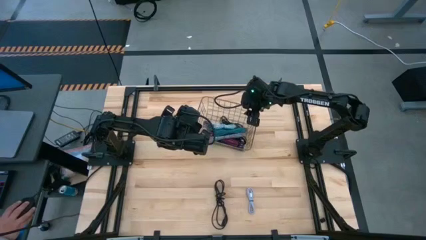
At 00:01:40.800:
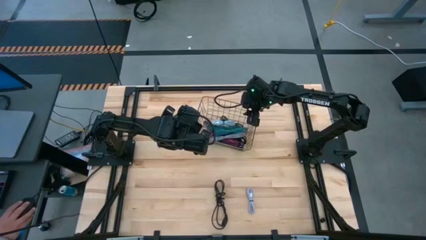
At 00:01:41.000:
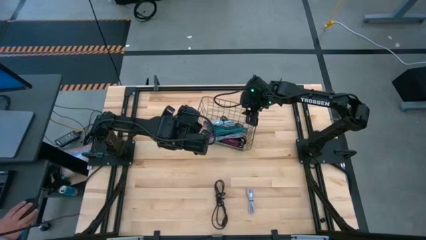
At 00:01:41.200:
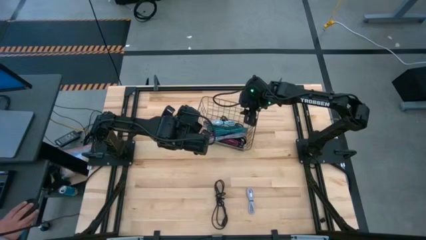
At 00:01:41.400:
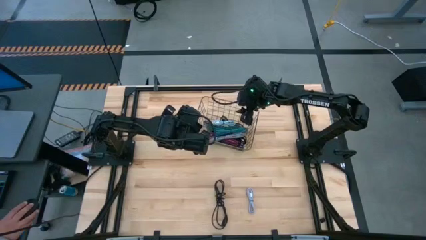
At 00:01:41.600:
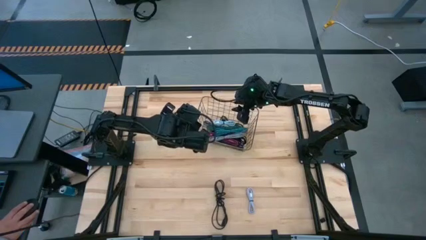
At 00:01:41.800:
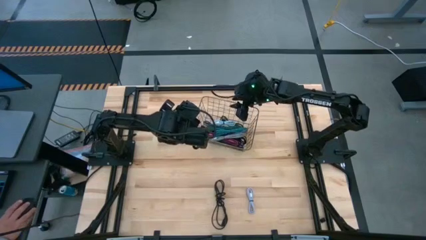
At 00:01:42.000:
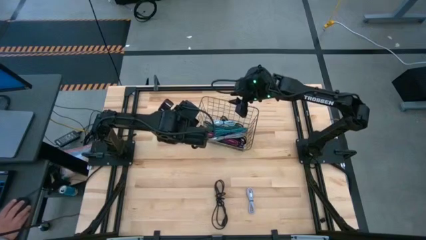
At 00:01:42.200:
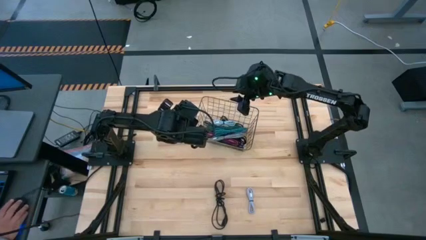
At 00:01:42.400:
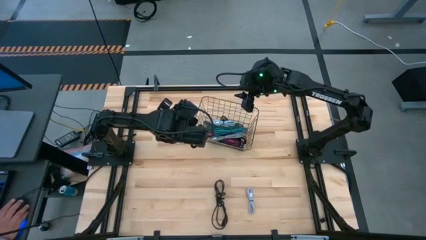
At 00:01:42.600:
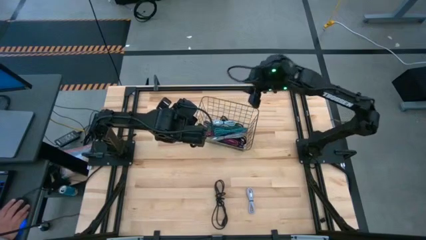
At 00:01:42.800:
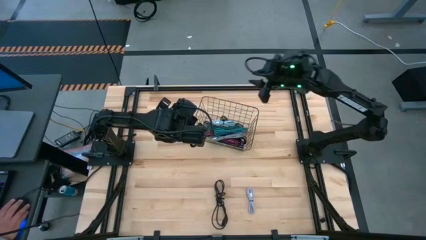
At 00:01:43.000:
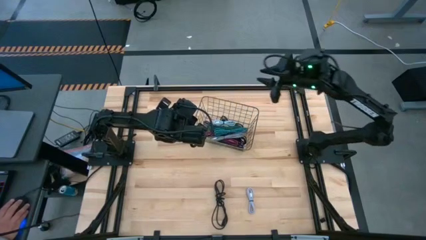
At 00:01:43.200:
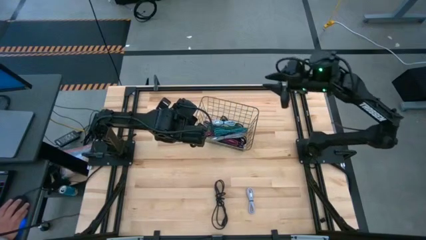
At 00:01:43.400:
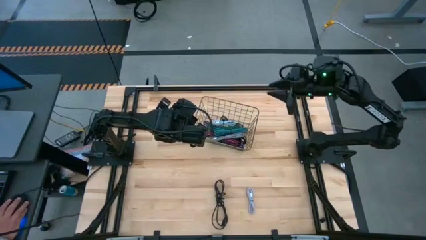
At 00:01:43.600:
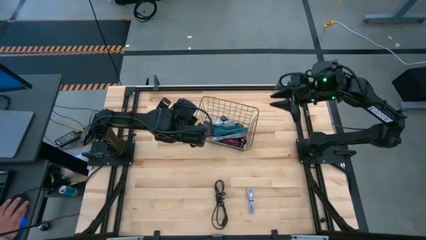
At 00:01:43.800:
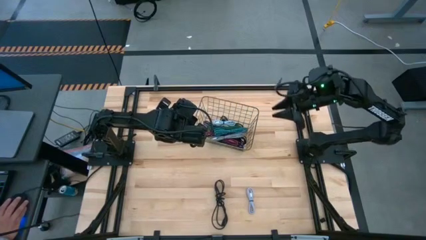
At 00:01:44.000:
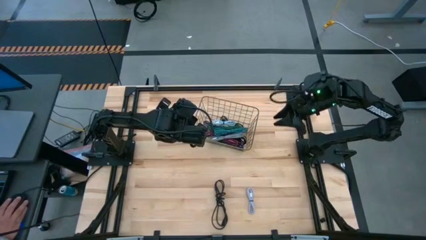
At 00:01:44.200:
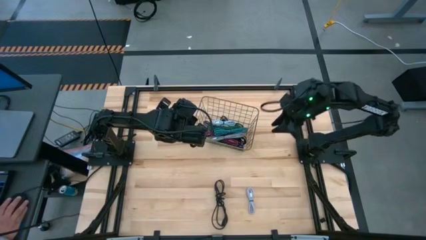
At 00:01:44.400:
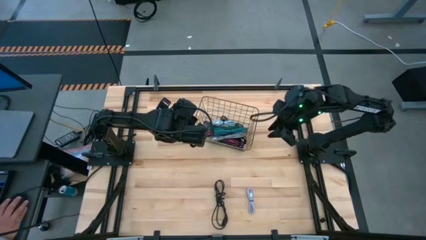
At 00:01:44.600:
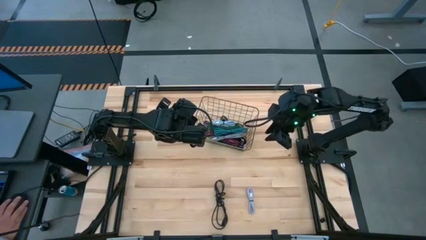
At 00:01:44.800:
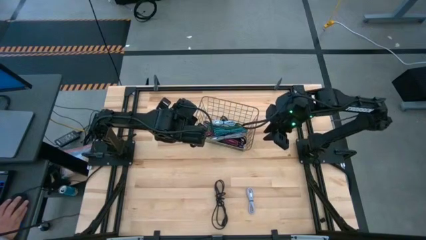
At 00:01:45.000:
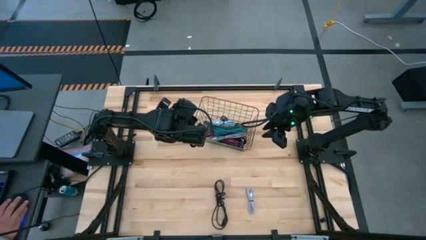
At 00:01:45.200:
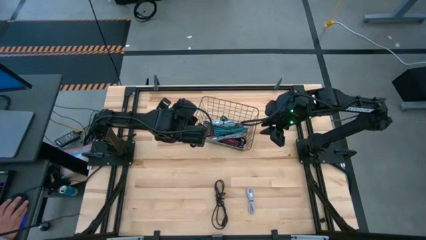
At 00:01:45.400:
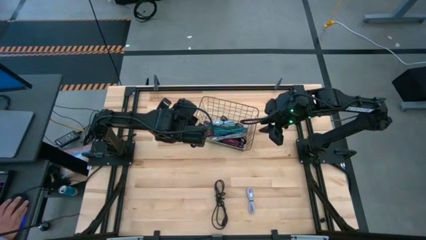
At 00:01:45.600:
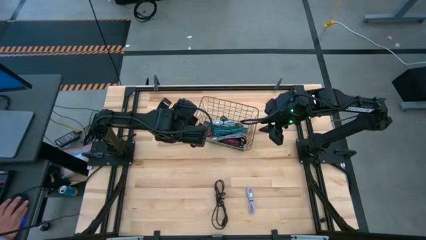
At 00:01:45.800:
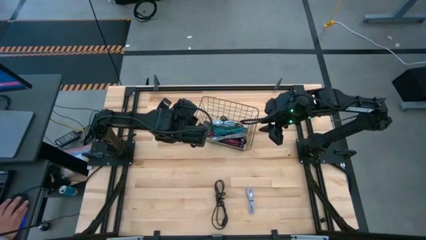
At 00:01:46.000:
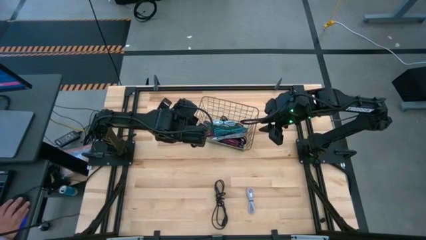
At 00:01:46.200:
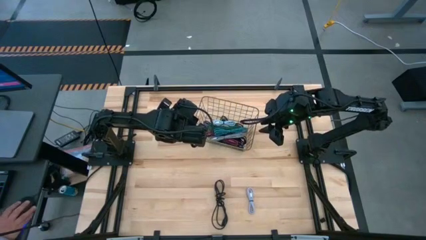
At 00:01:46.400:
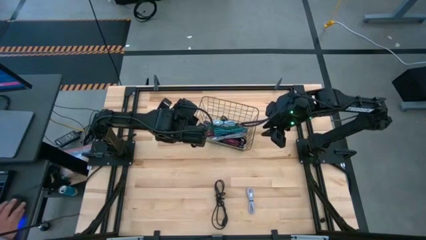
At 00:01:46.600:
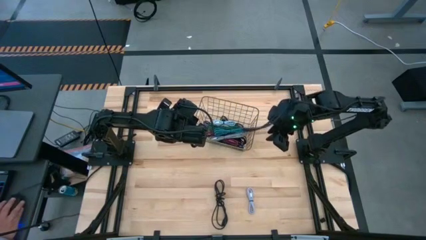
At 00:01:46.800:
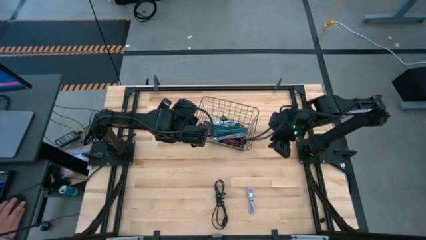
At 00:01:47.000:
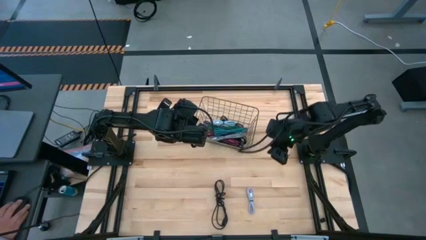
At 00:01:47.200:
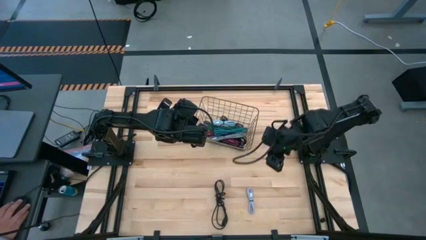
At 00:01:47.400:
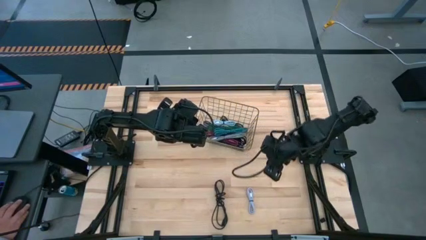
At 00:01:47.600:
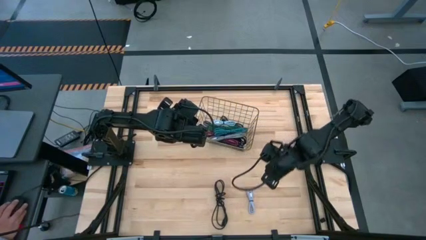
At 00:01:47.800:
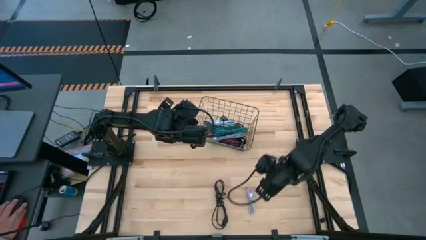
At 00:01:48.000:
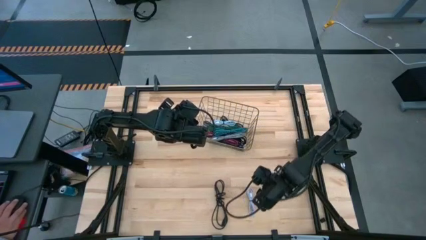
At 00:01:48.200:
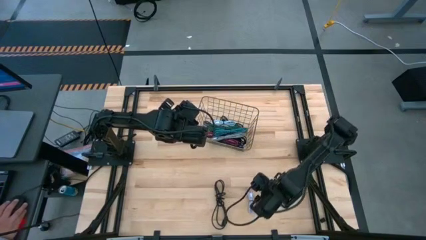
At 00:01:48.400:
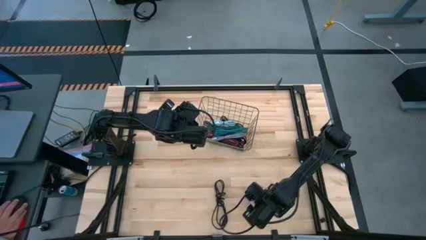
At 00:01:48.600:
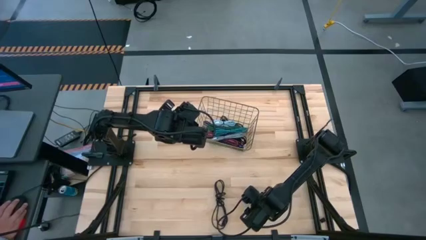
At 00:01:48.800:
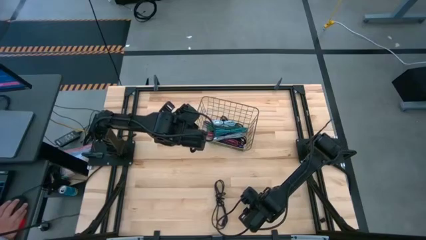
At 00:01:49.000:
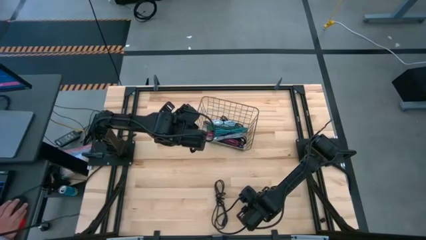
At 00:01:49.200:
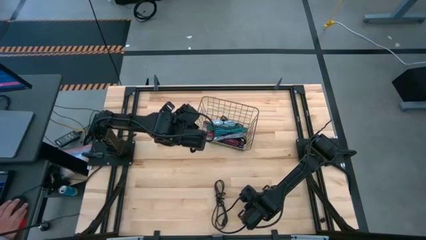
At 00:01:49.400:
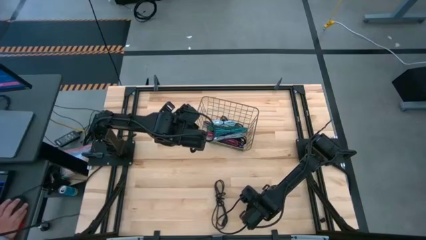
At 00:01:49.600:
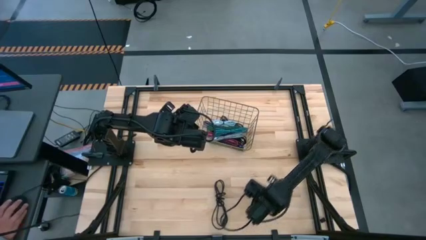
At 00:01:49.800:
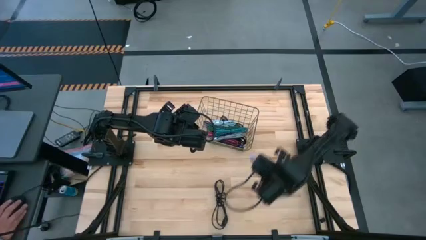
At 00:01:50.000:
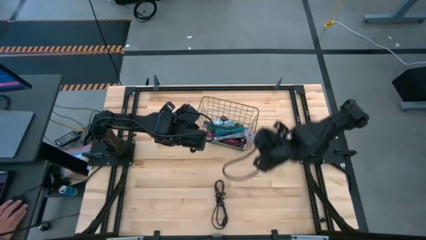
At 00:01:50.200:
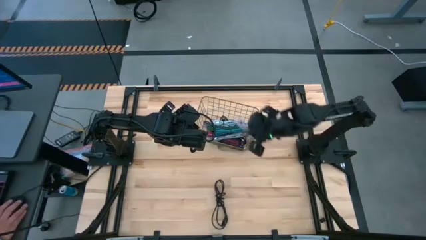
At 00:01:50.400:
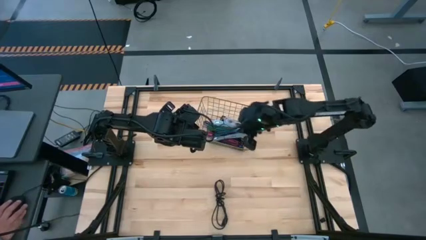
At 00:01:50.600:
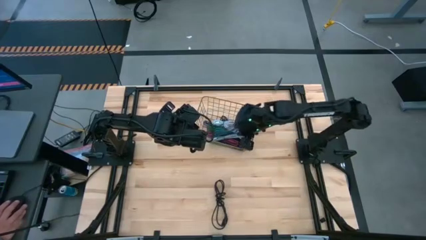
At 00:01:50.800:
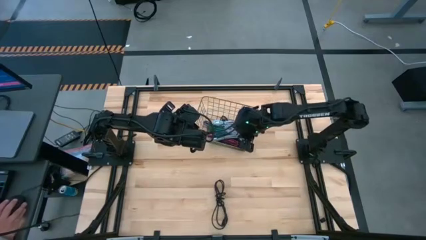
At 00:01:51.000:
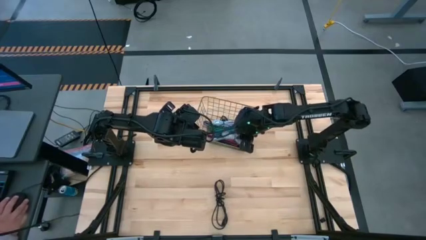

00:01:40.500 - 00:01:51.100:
Task: Pick and place USB-C Cables
Put the light purple USB cable into the gold wire basket

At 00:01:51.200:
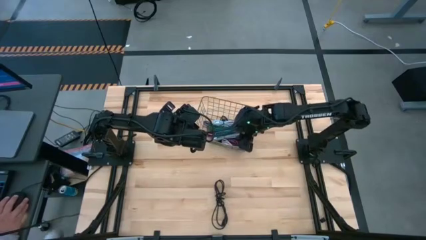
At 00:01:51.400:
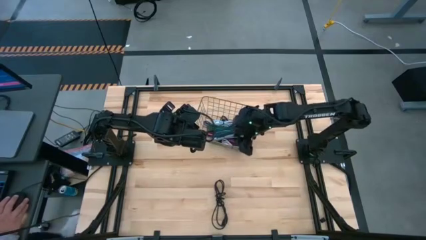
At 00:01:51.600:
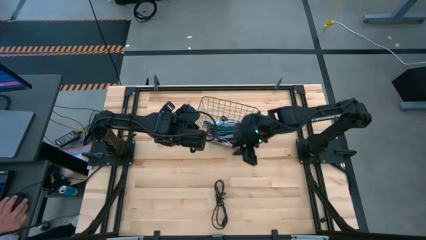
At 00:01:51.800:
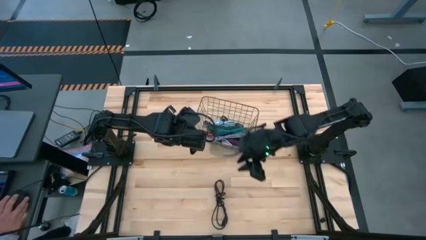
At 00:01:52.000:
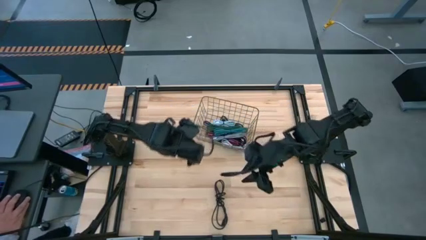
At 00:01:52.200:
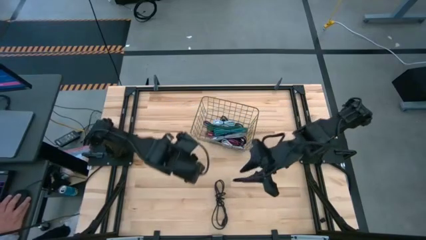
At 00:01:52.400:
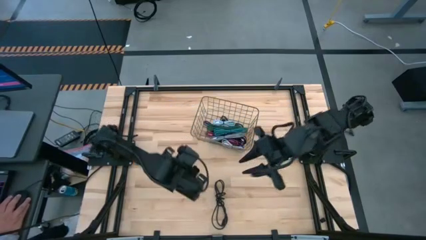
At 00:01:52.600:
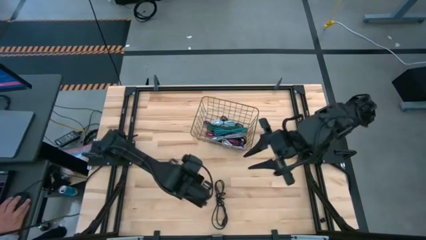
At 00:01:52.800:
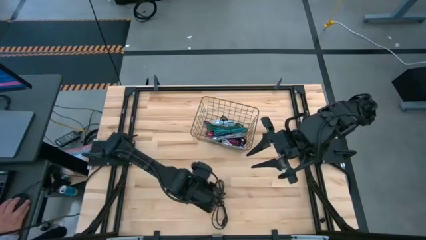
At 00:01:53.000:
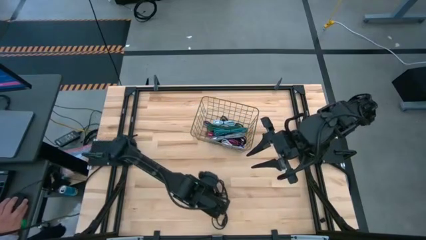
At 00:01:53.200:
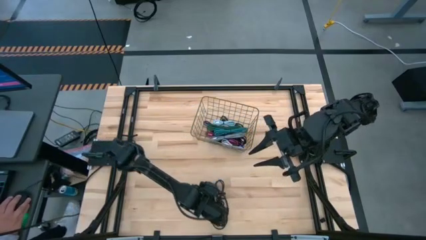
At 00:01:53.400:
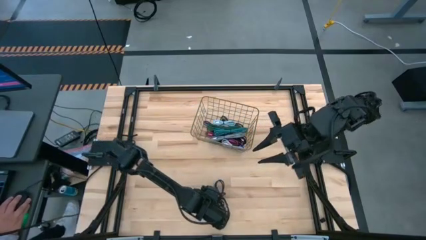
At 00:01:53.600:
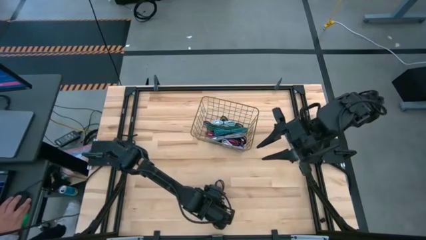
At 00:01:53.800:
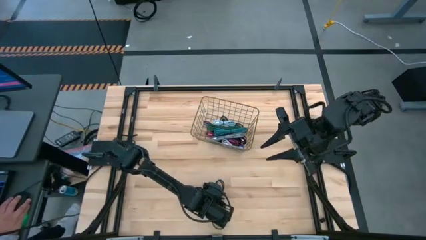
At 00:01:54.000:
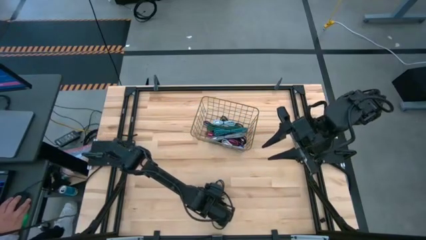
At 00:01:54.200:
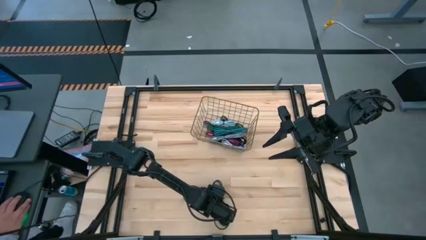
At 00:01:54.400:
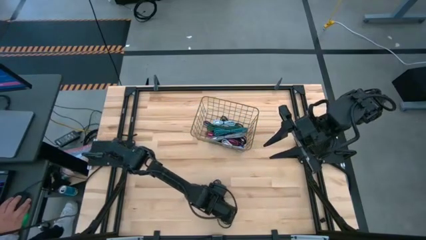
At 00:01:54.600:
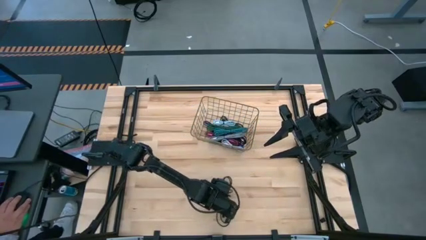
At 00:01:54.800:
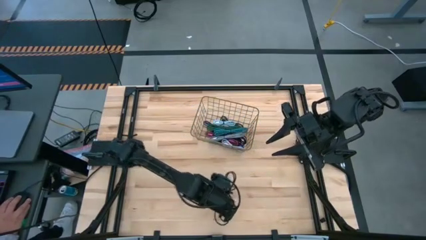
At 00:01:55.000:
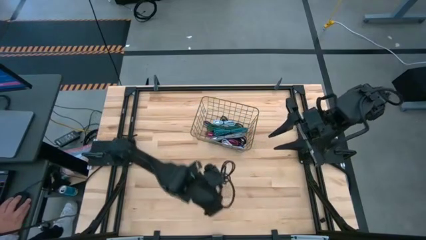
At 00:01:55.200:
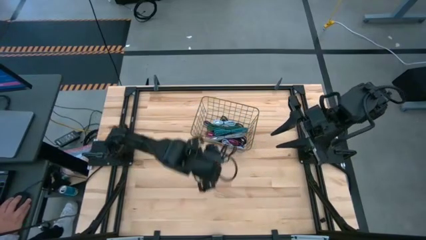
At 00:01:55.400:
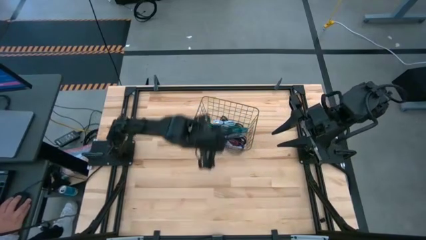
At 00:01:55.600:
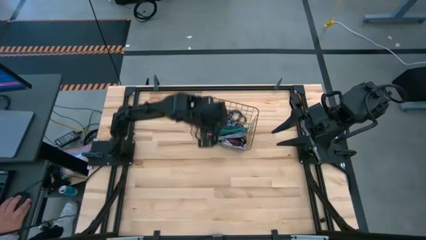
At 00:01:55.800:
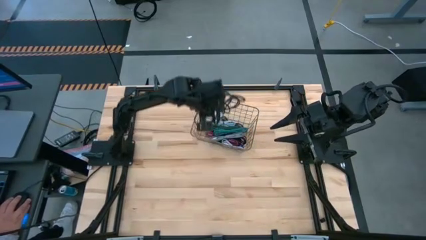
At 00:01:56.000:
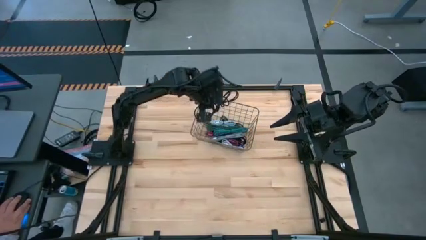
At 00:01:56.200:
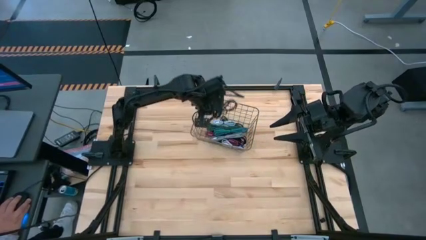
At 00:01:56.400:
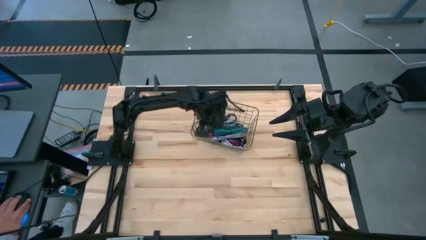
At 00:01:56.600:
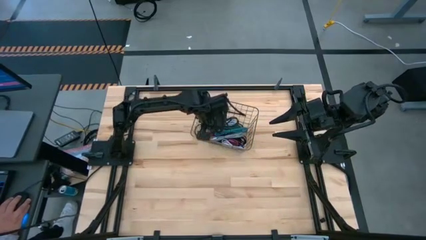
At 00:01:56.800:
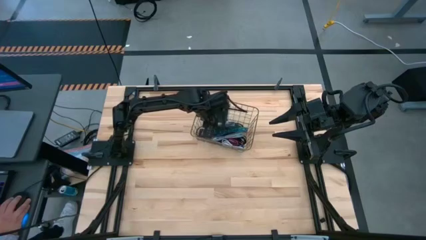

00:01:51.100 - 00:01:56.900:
Put the black USB cable into the gold wire basket
